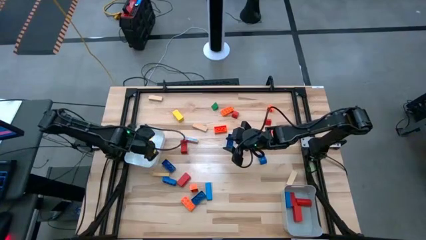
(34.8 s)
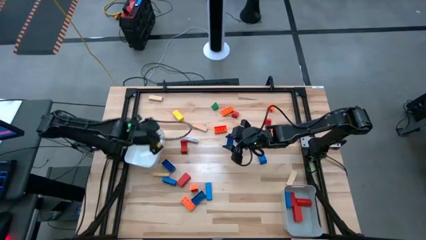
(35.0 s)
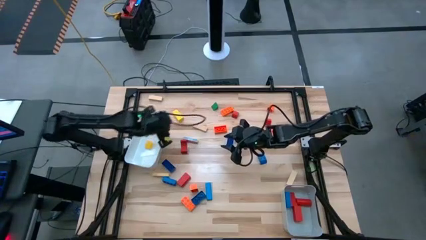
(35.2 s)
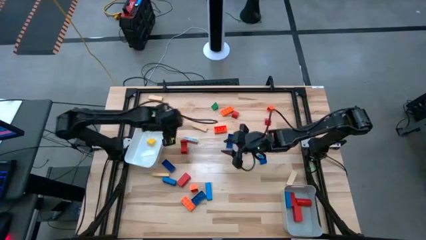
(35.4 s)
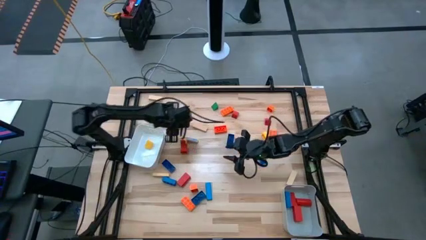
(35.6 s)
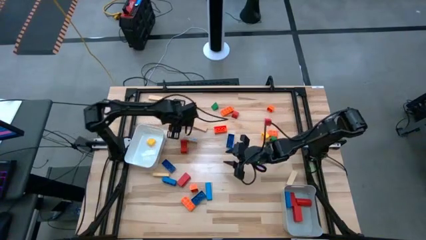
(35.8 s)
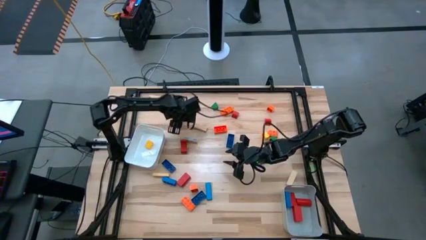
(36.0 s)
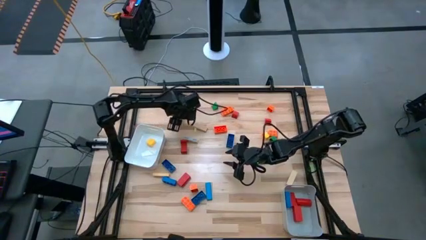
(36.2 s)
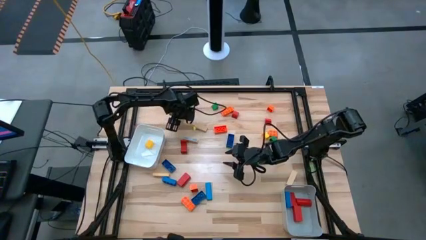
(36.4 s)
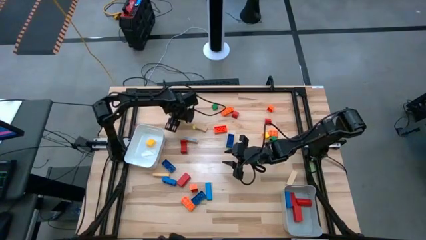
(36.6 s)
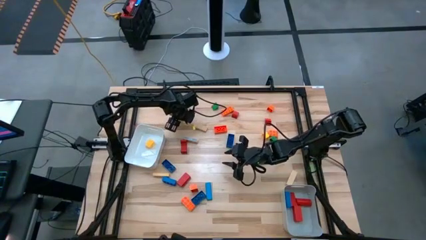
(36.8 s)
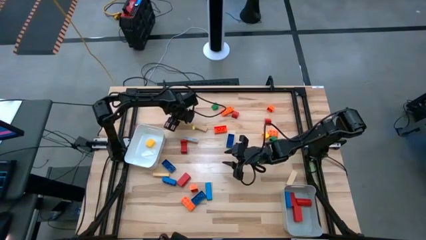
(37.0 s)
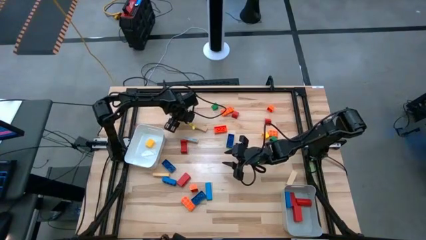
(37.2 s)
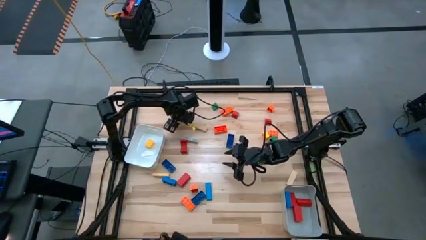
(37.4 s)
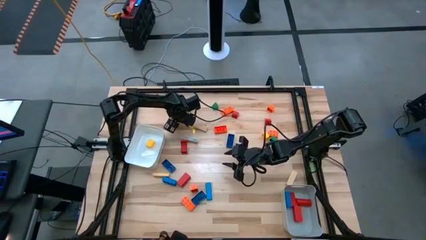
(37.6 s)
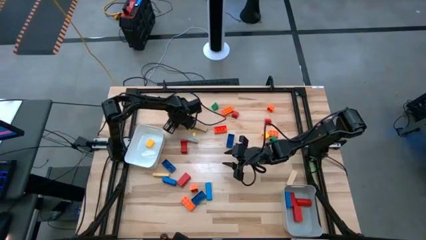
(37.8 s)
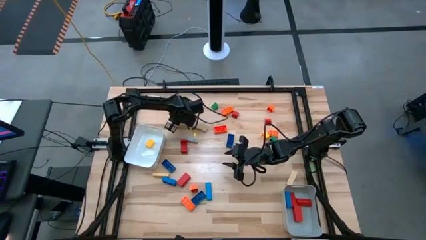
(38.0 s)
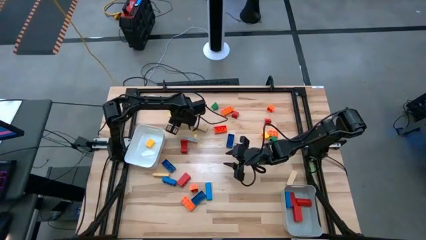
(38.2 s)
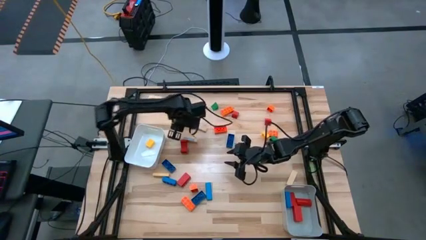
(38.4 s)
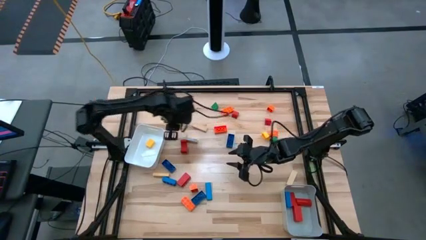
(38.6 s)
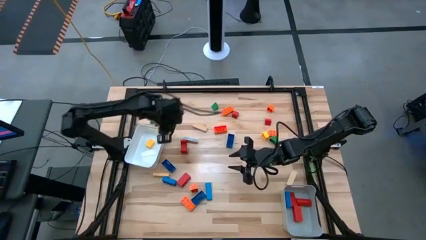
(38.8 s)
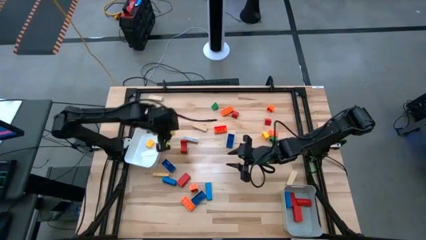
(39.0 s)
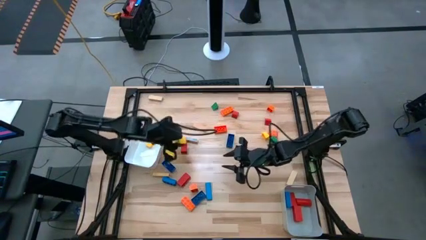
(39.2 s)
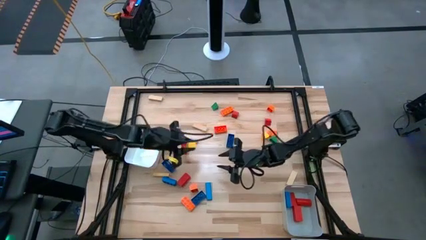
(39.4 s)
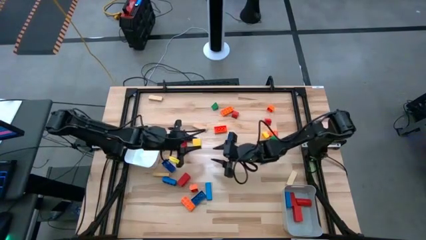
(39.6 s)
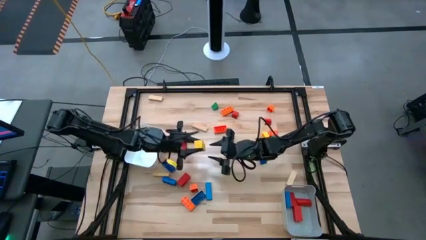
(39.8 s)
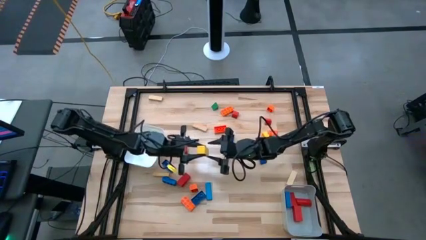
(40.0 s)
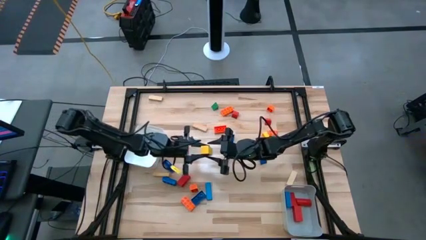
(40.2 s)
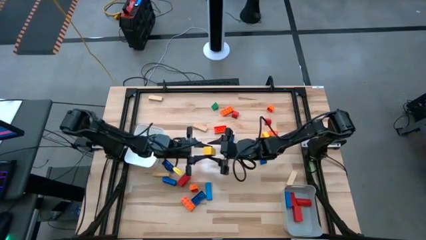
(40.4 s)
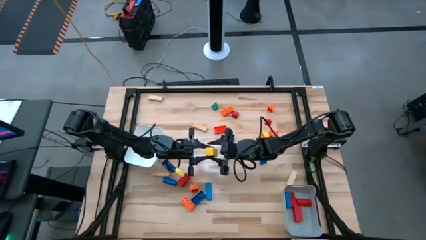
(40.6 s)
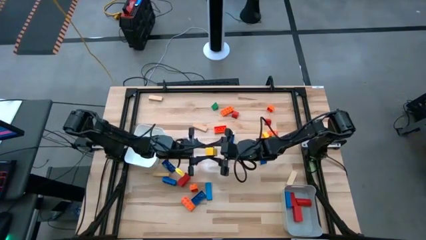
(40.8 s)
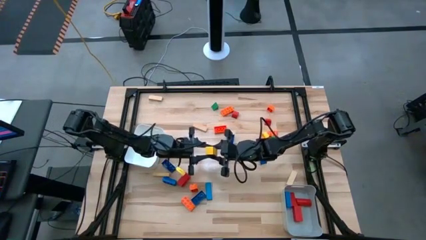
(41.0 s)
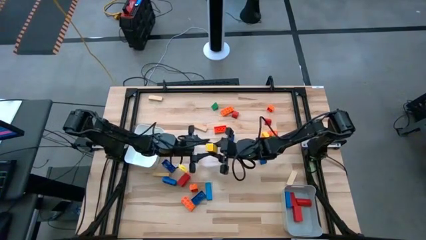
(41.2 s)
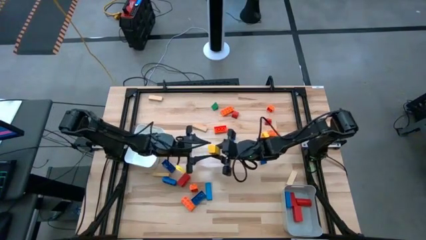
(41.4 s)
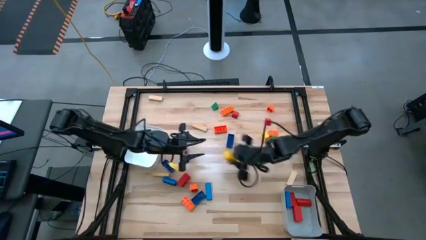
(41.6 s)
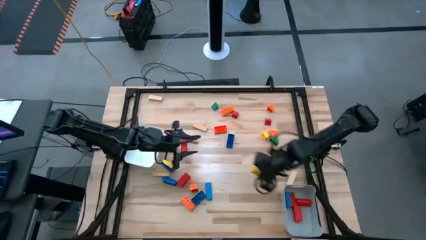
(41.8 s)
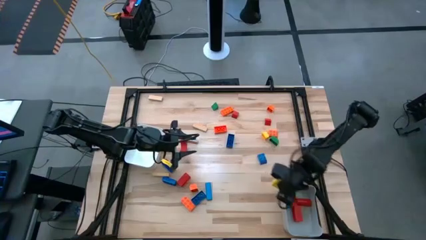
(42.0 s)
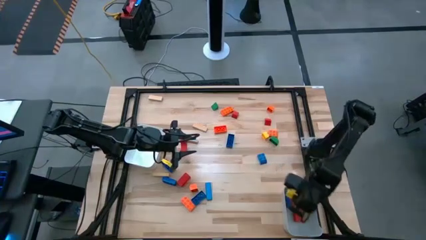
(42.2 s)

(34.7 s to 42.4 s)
Task: Sort blocks by size
Put the yellow large block into the gray bin

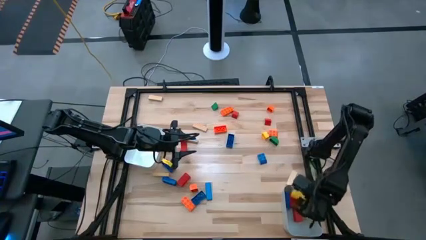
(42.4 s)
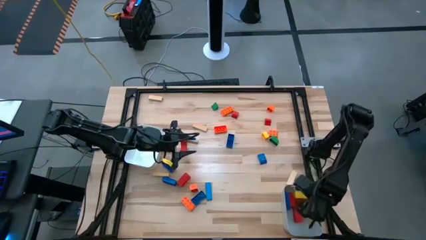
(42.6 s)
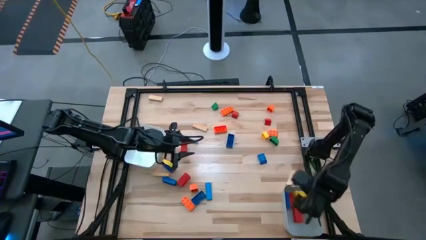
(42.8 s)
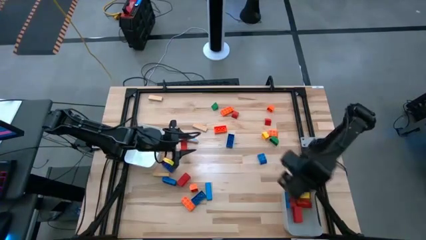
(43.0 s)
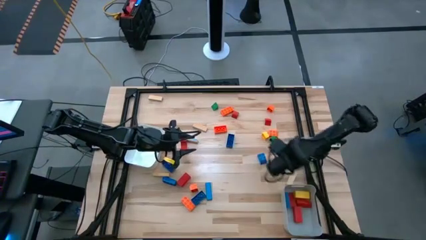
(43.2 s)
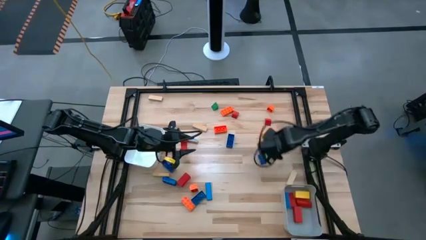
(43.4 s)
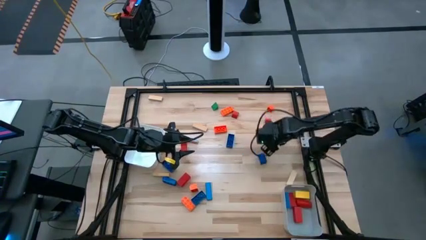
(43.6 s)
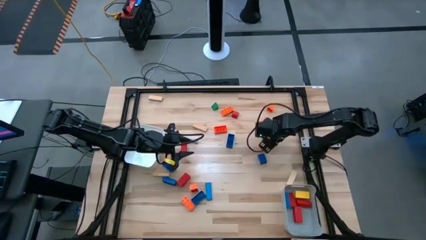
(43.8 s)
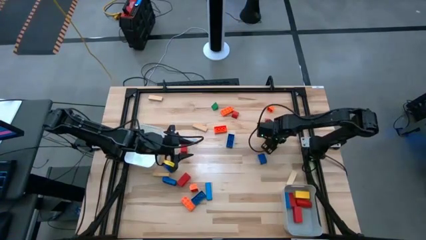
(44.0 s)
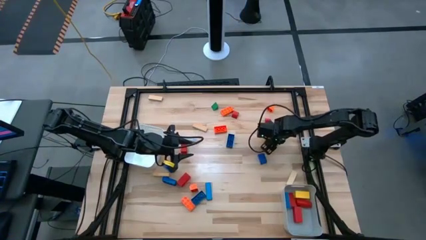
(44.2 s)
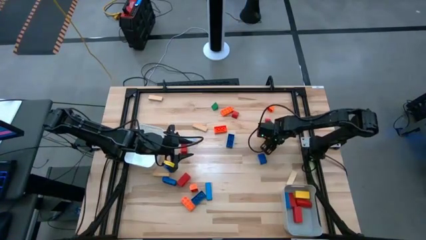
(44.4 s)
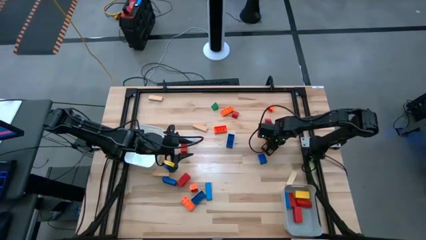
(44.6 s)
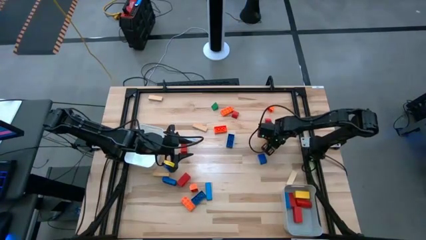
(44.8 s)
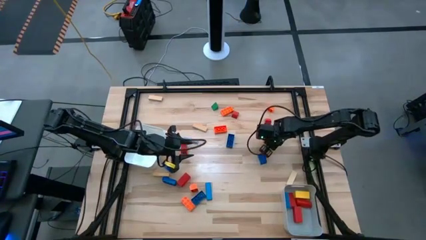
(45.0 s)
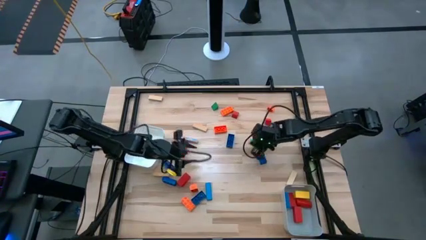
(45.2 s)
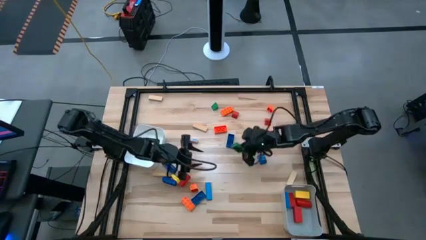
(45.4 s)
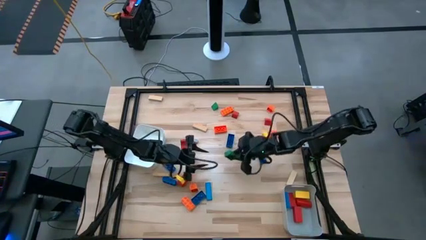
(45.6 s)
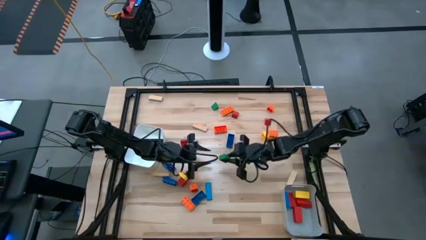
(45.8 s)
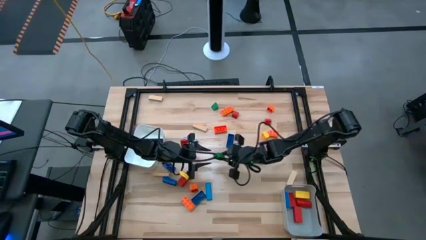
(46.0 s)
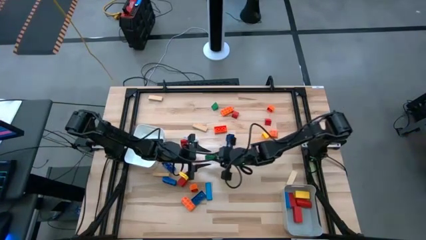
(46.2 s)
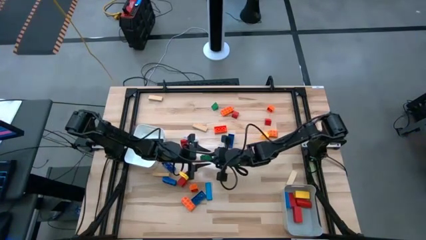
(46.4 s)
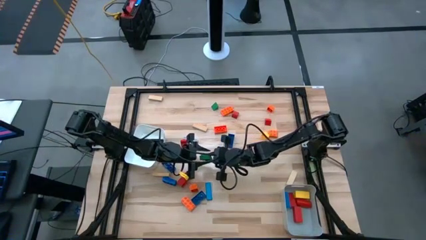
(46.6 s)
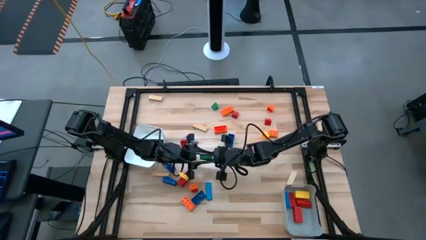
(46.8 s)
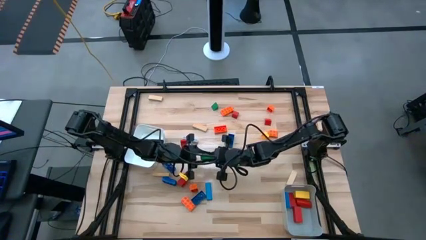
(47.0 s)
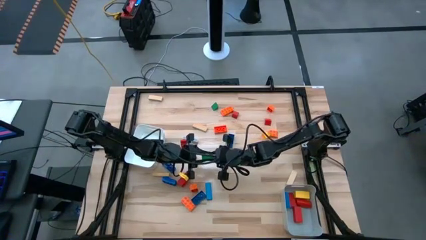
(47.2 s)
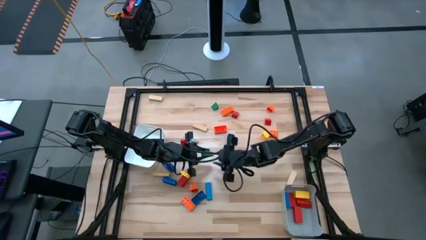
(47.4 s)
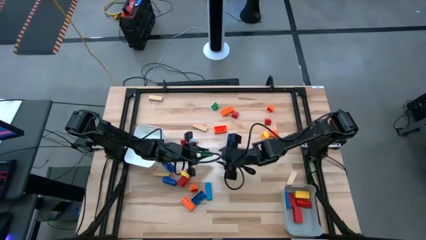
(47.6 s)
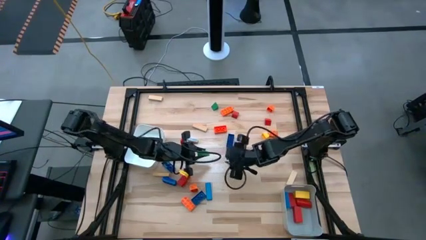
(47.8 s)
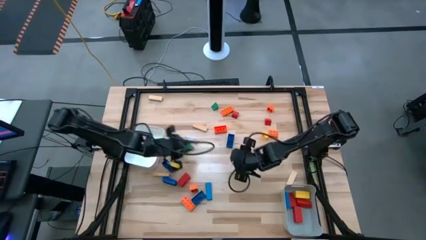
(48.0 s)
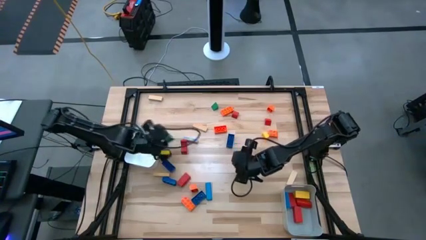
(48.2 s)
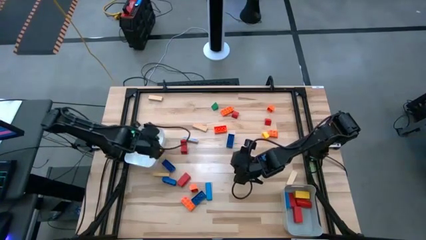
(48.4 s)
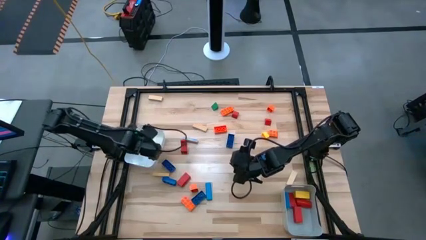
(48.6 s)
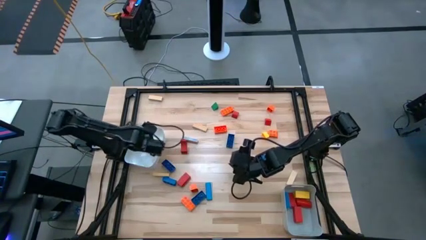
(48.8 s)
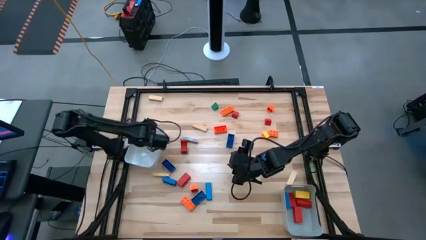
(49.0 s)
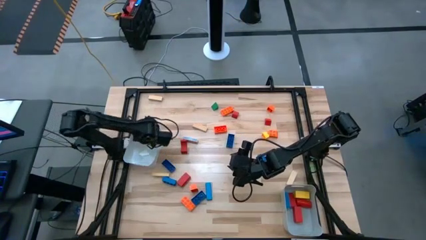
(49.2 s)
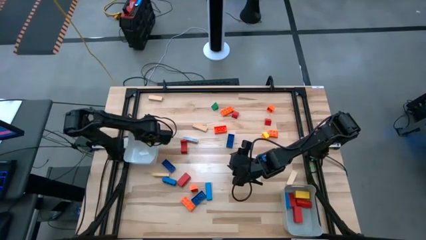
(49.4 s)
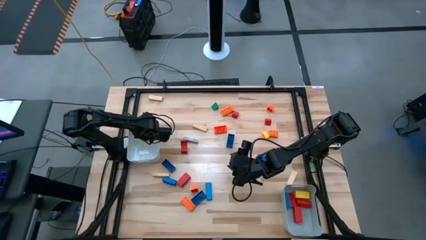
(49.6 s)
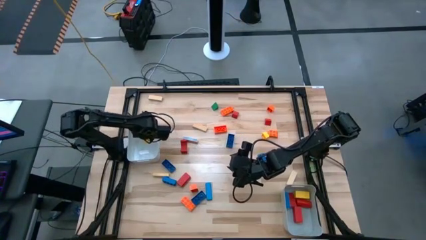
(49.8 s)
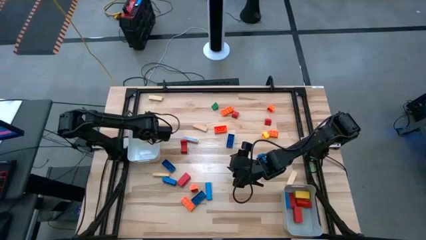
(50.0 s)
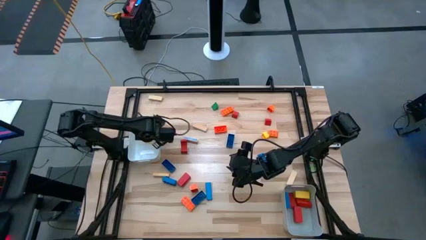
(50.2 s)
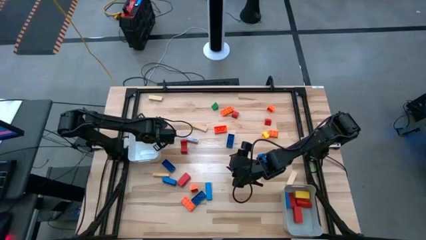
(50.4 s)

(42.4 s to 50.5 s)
Put the green small block into the white bin
